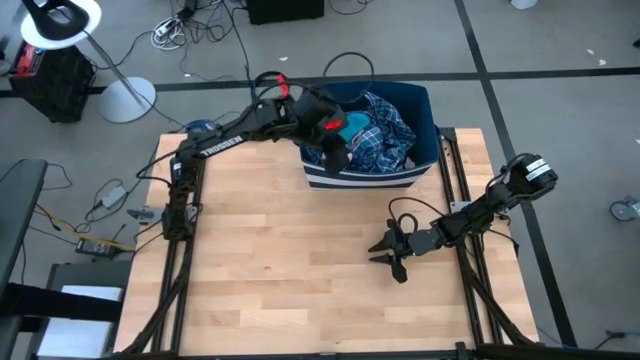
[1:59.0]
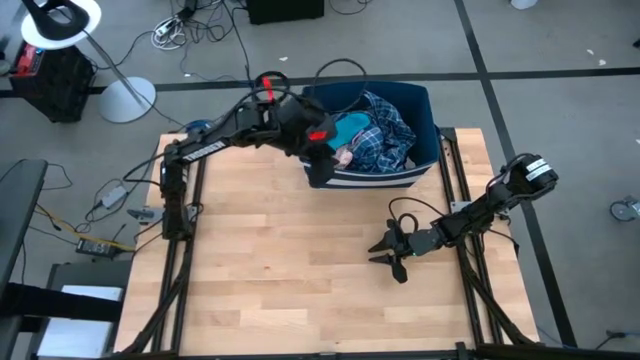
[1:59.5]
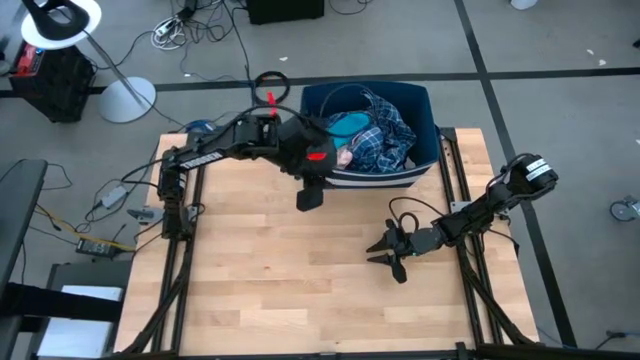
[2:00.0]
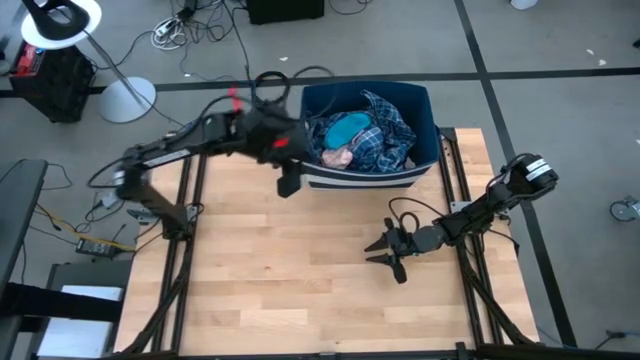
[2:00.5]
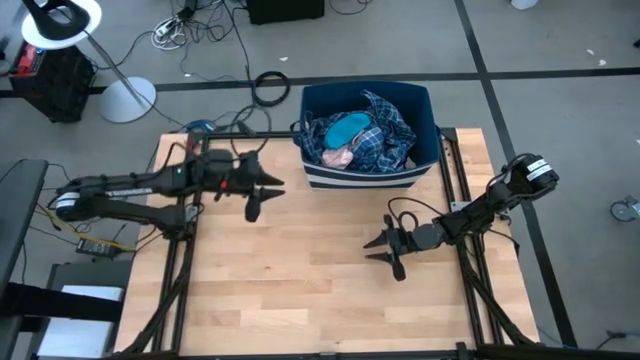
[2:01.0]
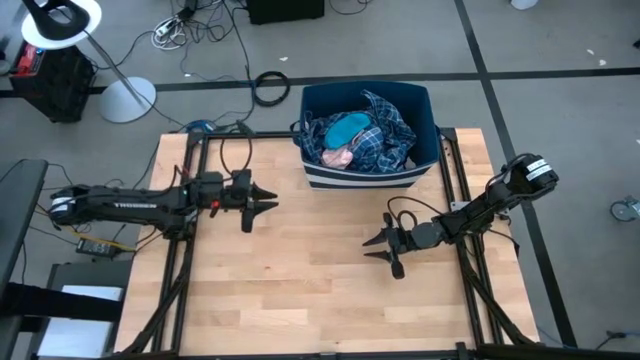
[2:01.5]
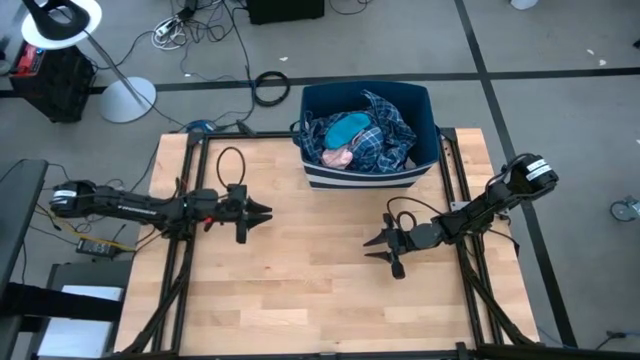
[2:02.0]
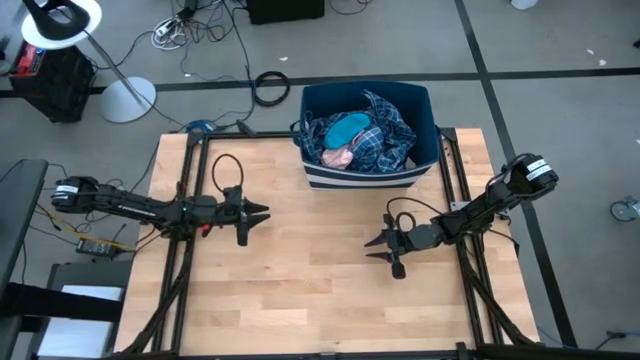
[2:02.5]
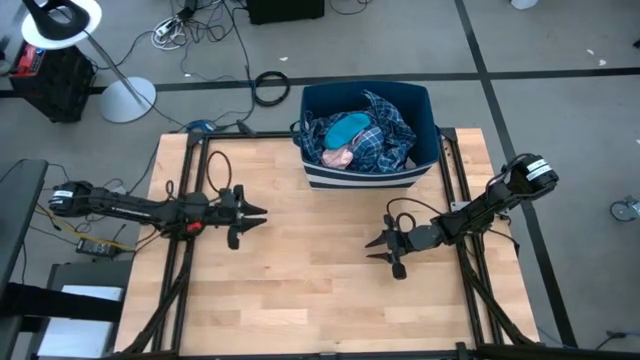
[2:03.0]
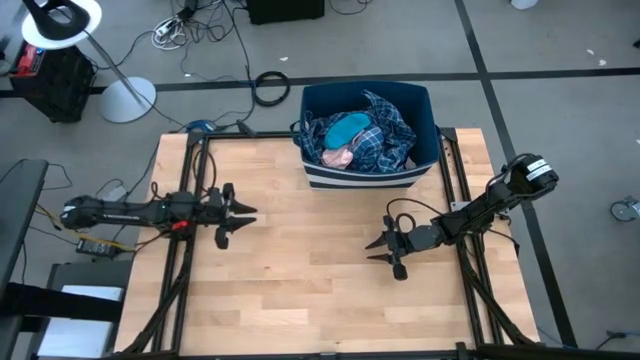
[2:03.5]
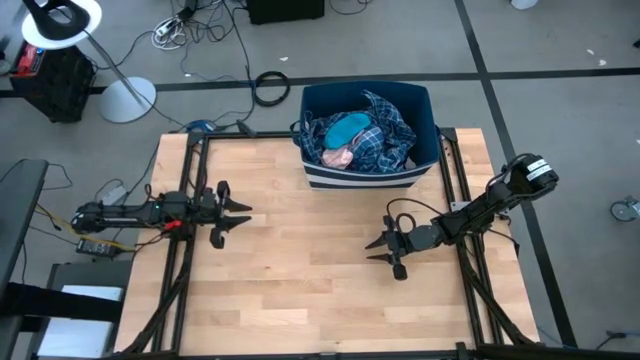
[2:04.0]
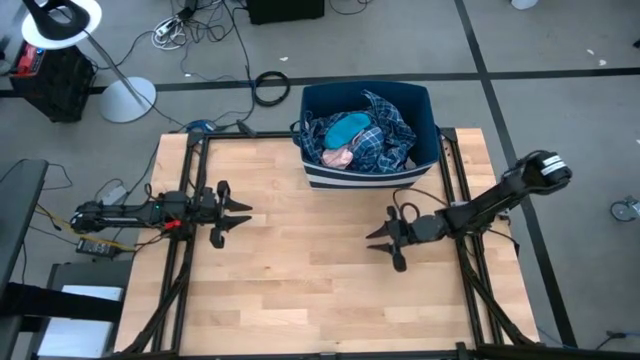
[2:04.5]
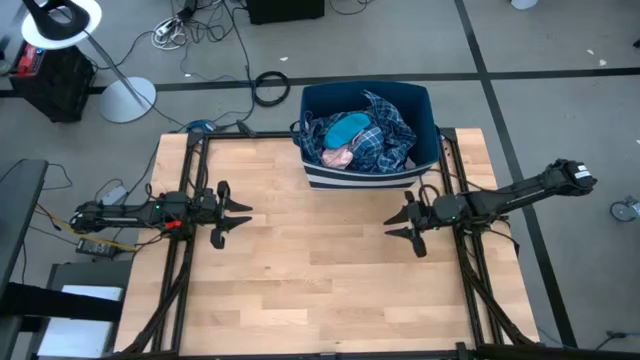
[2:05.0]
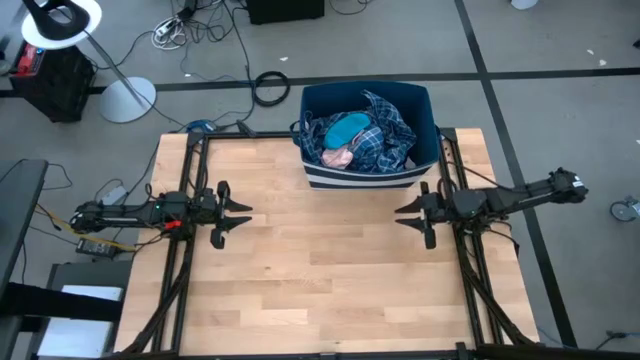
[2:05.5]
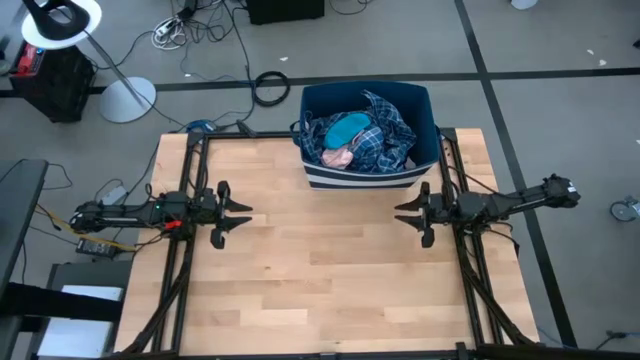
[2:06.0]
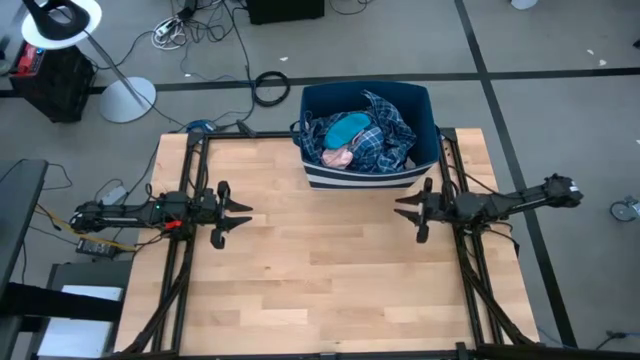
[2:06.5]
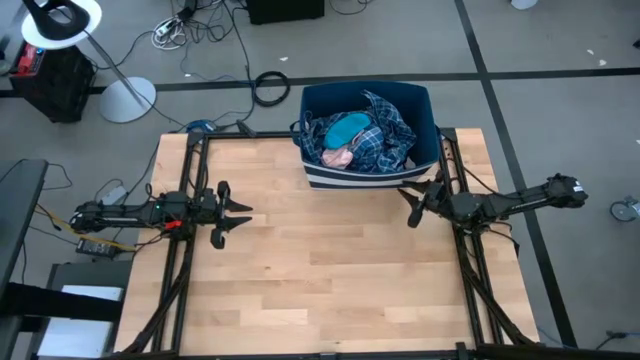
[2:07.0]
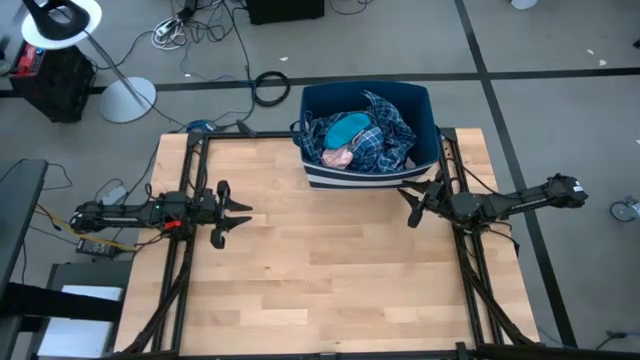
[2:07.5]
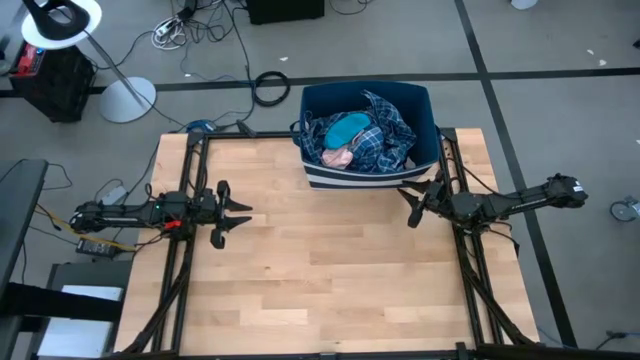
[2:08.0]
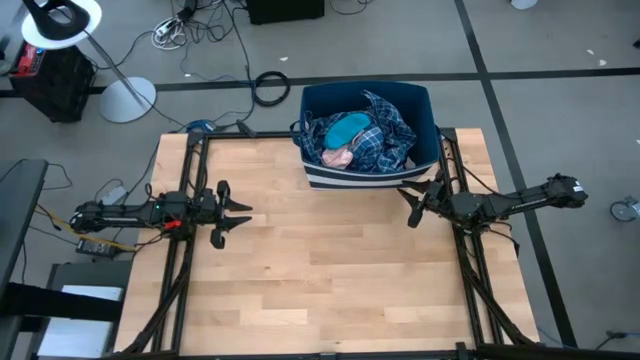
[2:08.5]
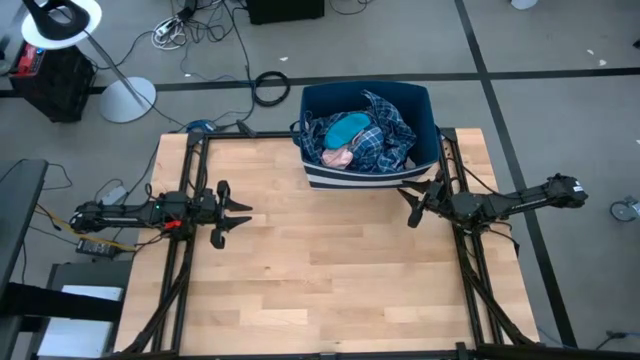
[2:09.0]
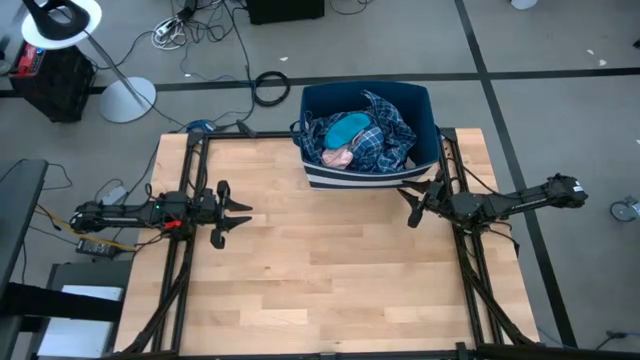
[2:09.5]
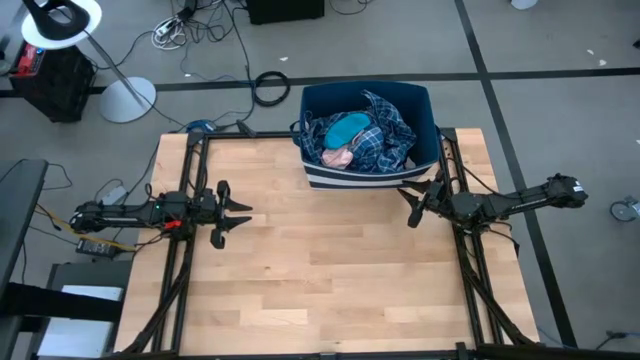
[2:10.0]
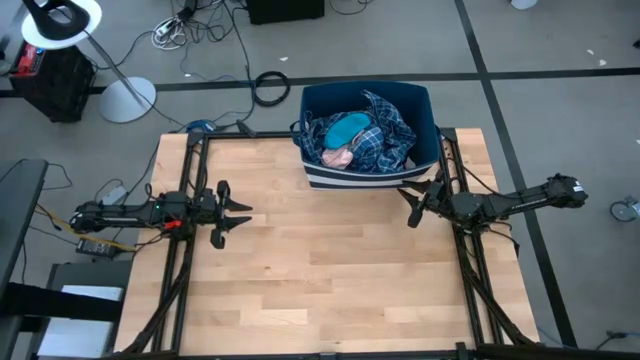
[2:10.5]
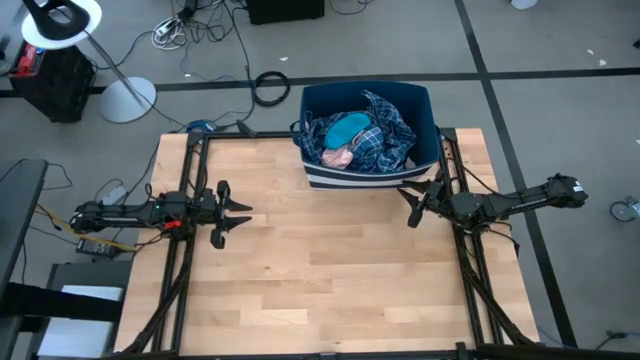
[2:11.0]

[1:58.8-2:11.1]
Task: Sort clothes
Return to Home Position

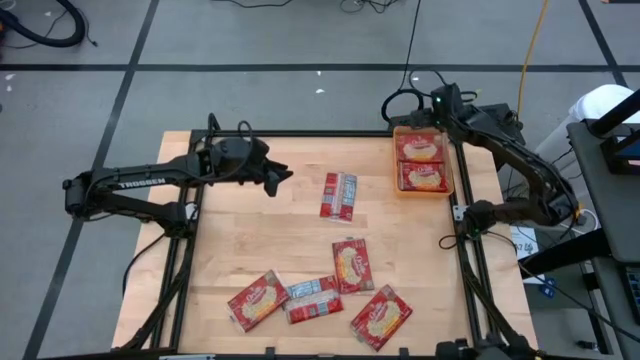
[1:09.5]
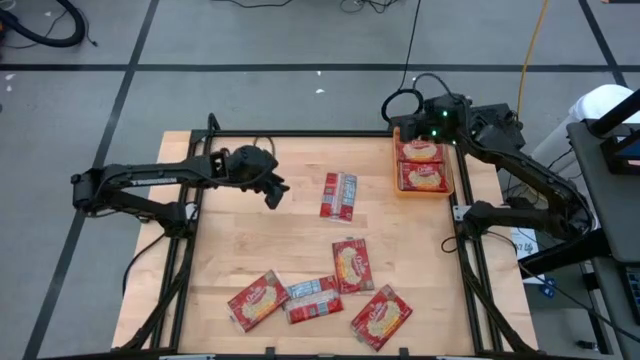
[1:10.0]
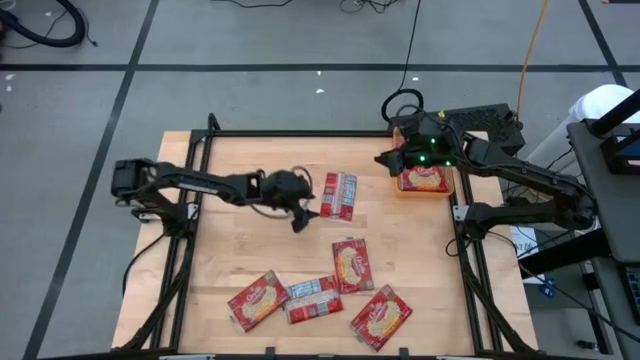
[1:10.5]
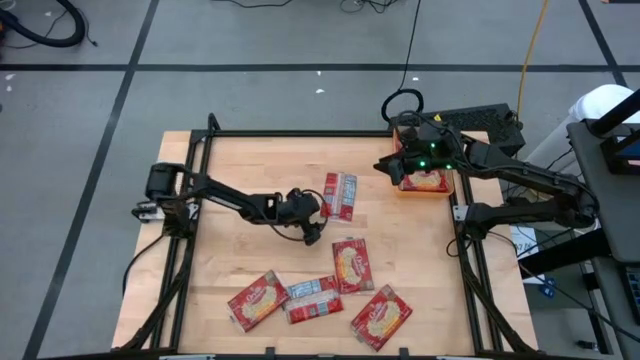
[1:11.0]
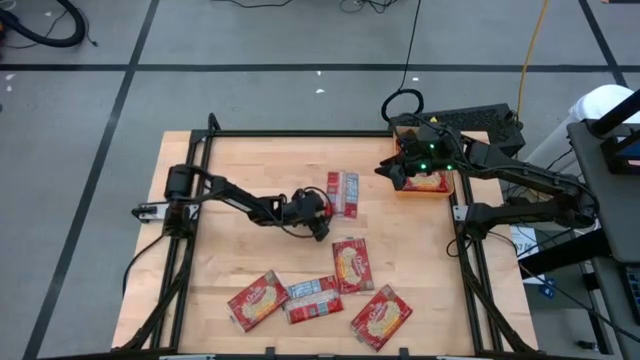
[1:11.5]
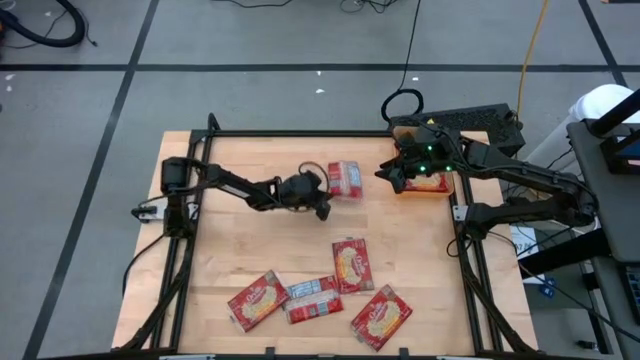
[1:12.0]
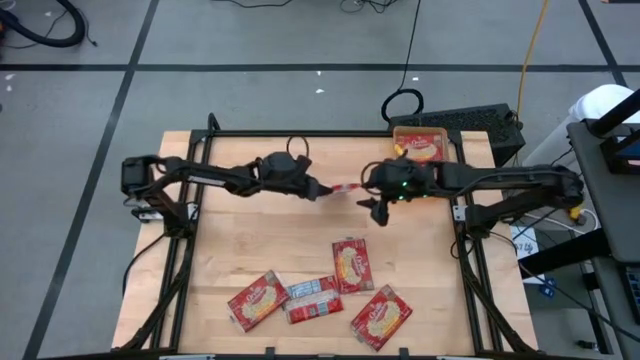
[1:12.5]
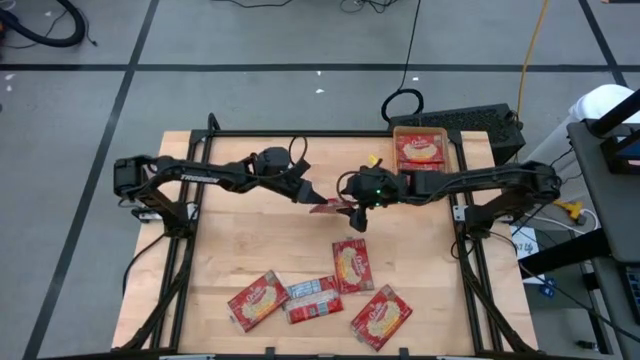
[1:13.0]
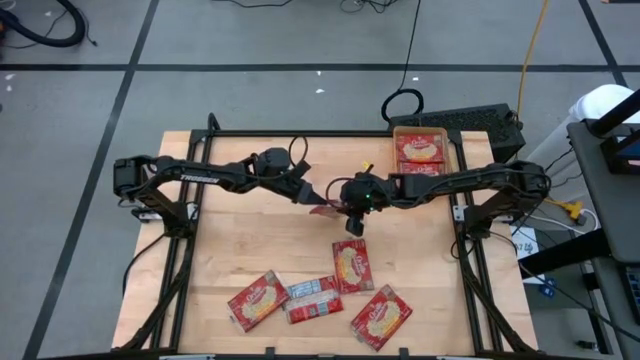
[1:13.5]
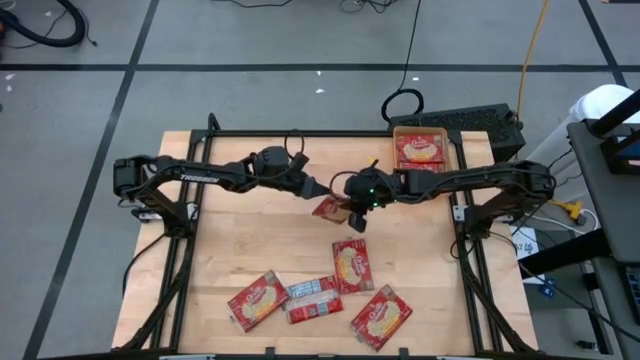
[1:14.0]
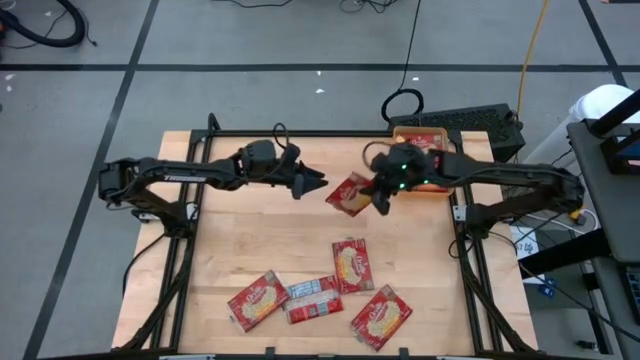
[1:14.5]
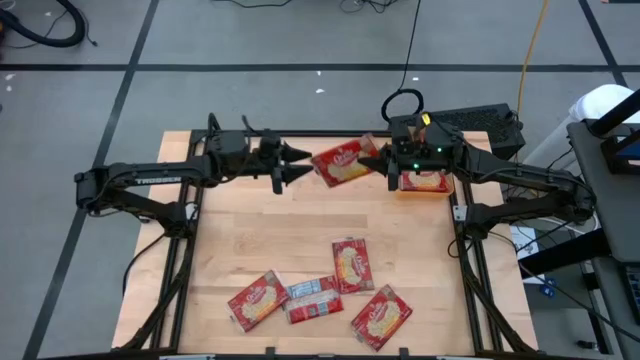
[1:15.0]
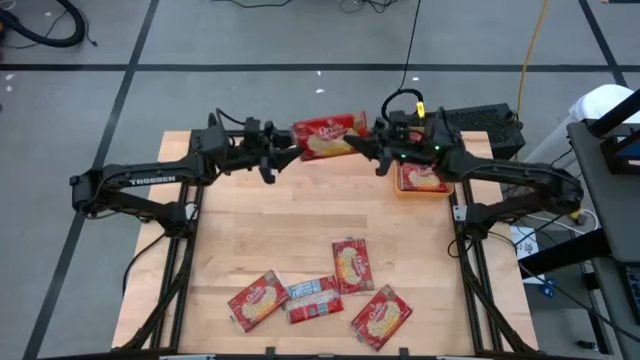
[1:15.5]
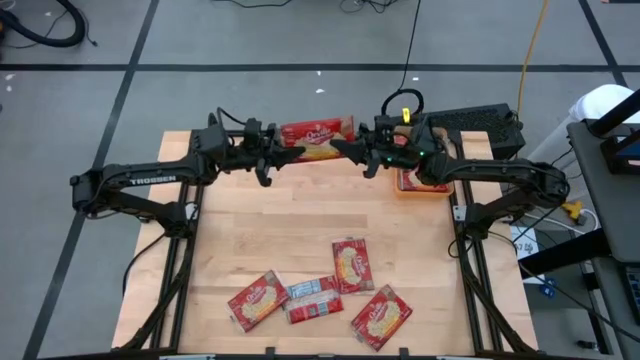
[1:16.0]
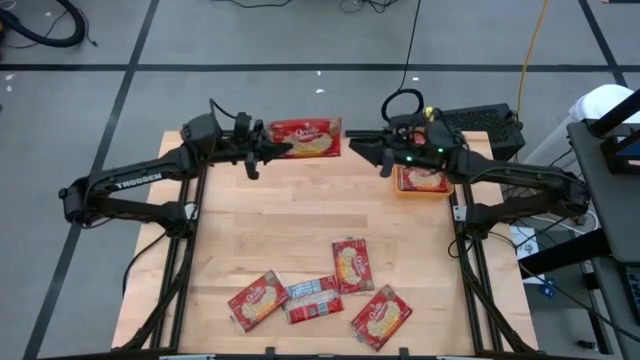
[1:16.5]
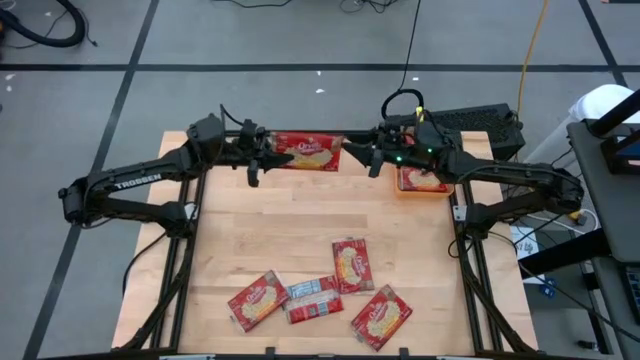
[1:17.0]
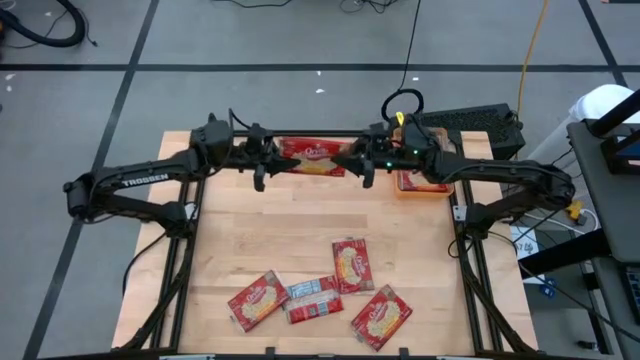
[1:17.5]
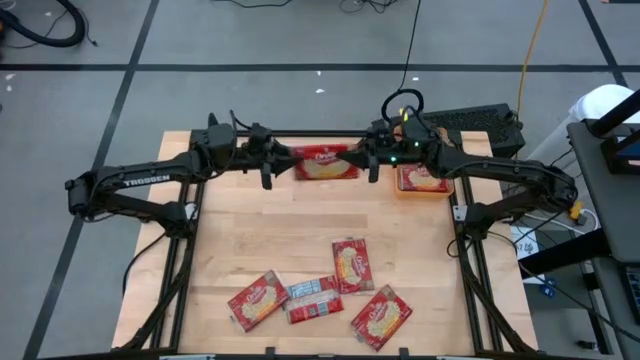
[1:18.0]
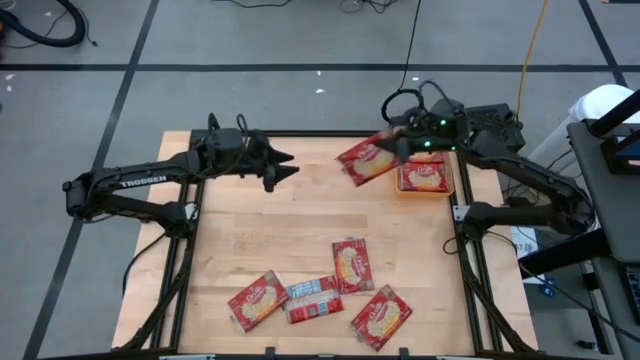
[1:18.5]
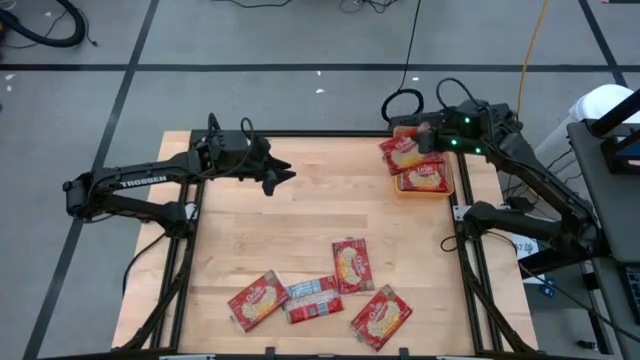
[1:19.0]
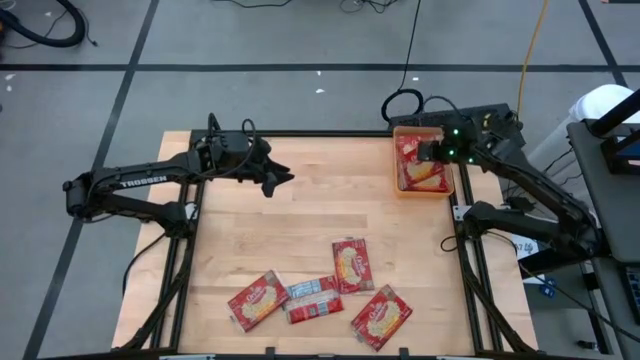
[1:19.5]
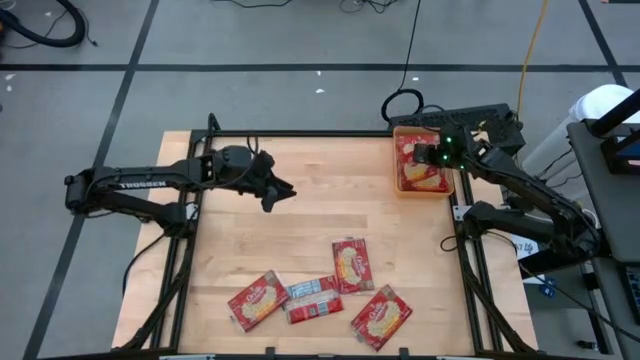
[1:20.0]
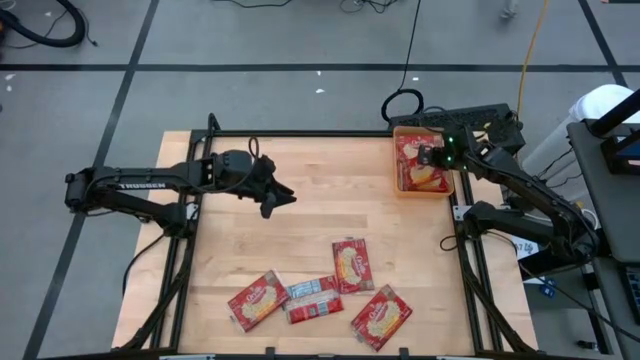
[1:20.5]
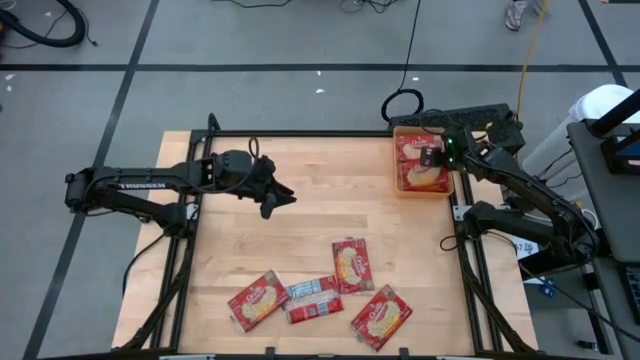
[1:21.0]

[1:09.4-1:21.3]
Task: Sort popcorn bags into baskets
Put the red popcorn bag into the orange bin
